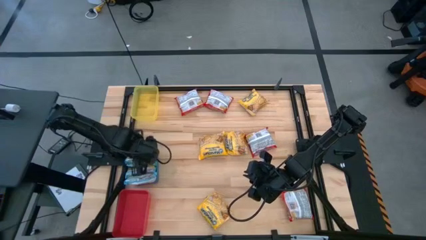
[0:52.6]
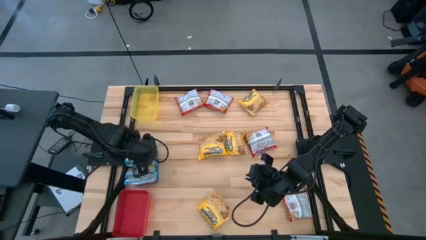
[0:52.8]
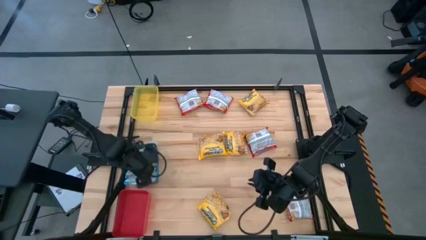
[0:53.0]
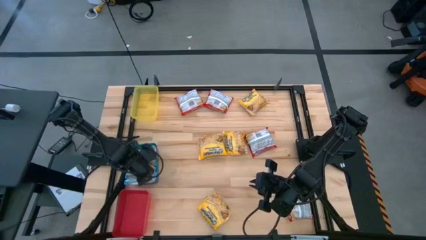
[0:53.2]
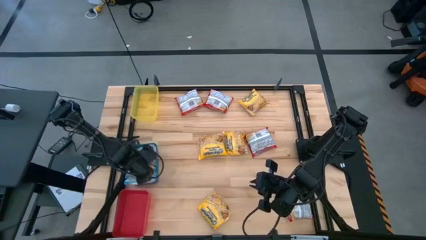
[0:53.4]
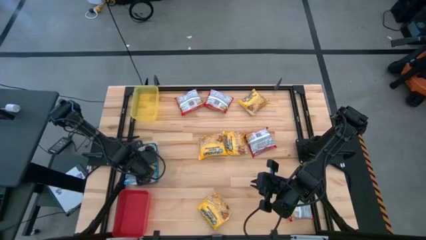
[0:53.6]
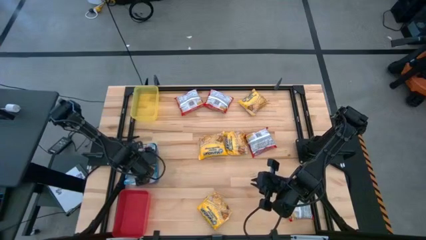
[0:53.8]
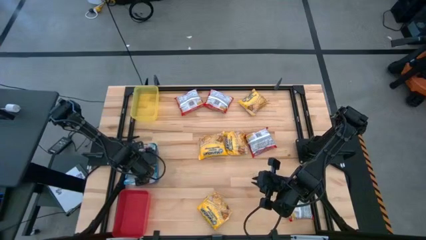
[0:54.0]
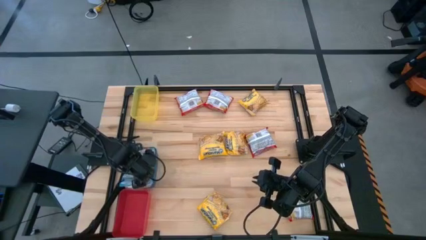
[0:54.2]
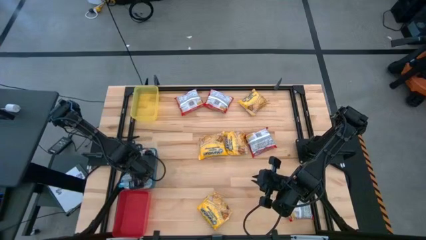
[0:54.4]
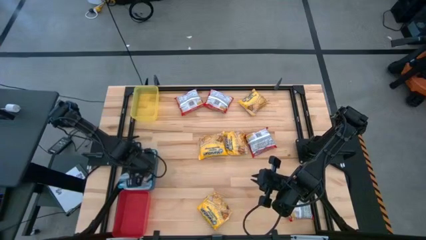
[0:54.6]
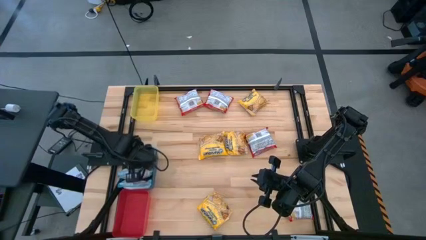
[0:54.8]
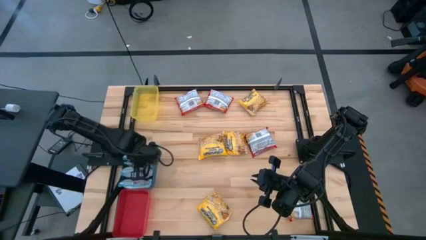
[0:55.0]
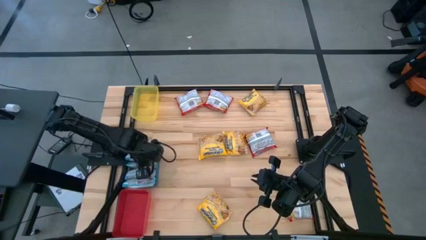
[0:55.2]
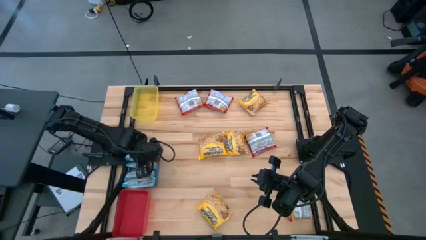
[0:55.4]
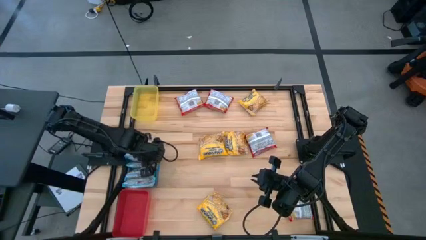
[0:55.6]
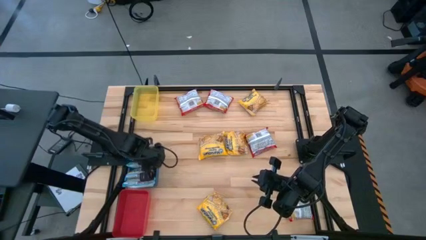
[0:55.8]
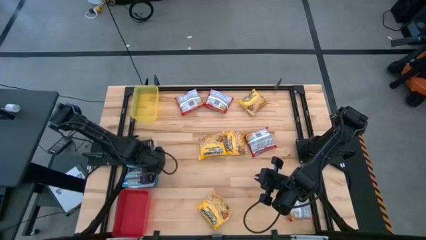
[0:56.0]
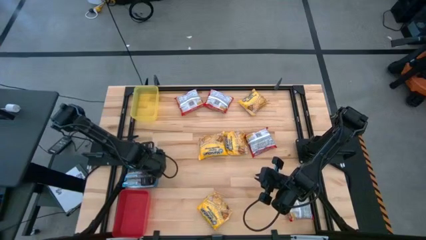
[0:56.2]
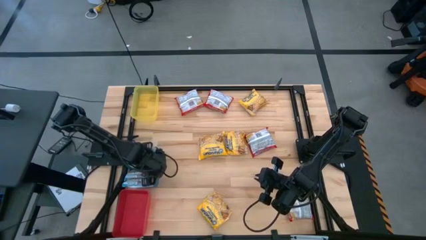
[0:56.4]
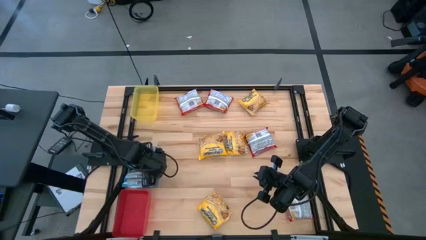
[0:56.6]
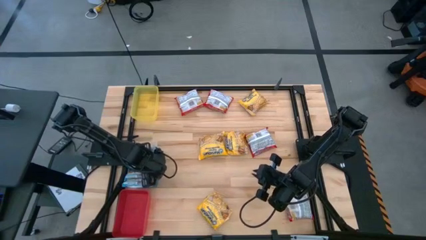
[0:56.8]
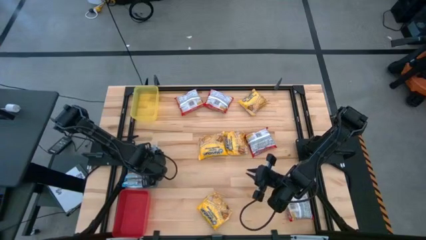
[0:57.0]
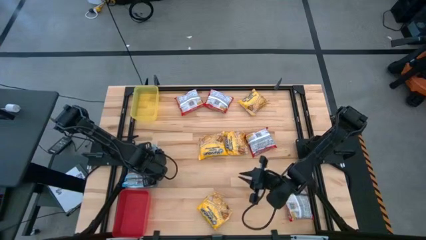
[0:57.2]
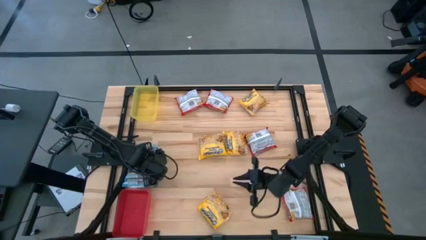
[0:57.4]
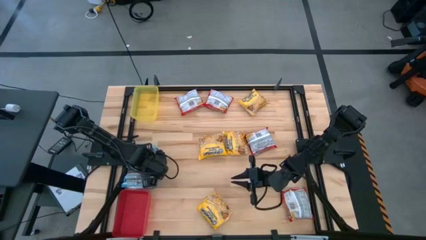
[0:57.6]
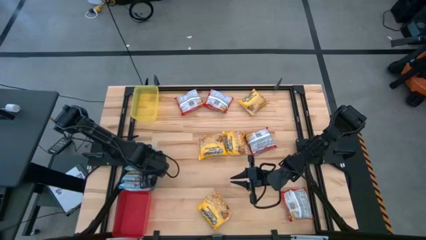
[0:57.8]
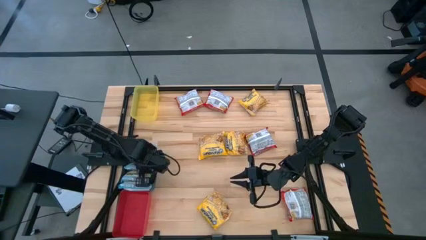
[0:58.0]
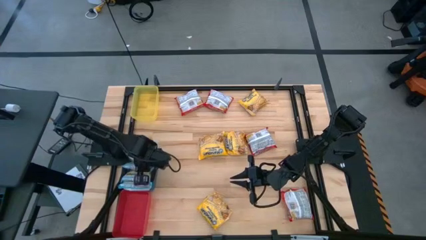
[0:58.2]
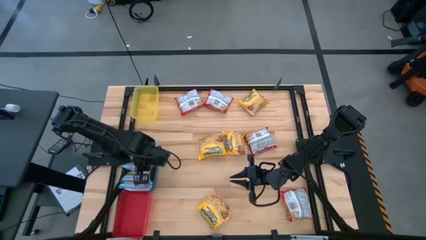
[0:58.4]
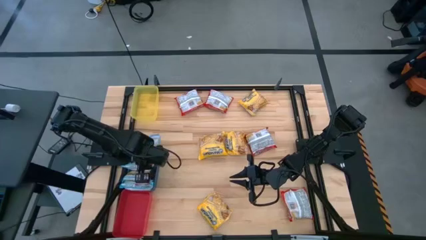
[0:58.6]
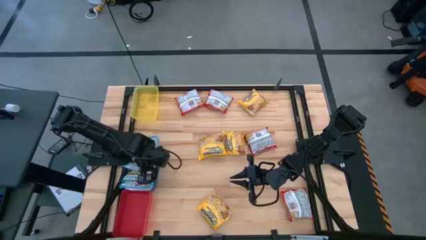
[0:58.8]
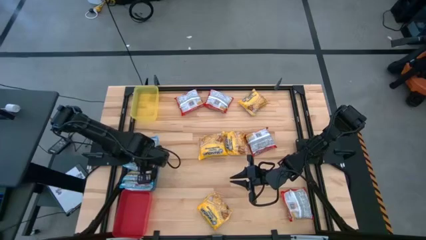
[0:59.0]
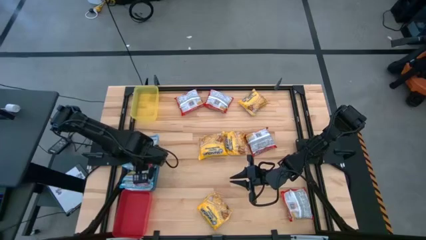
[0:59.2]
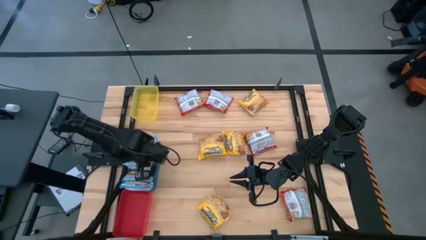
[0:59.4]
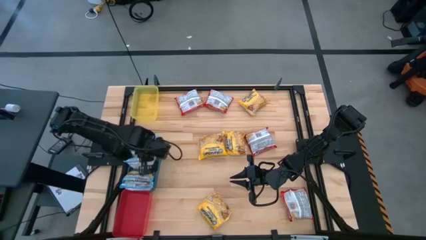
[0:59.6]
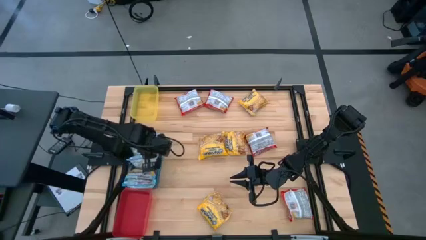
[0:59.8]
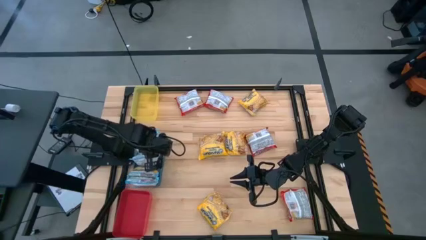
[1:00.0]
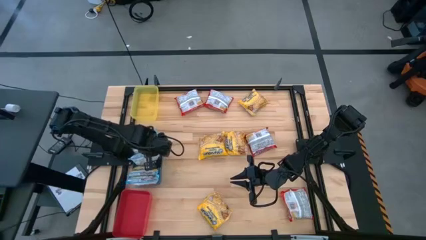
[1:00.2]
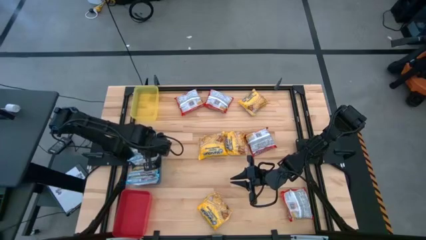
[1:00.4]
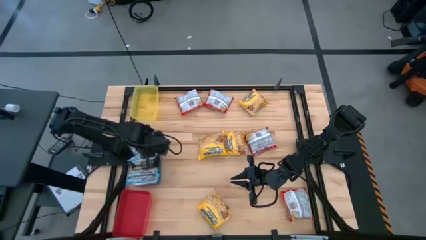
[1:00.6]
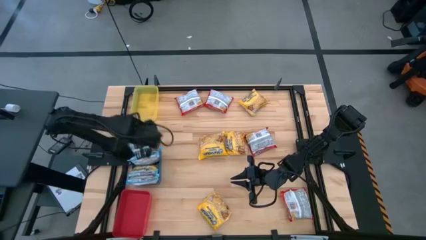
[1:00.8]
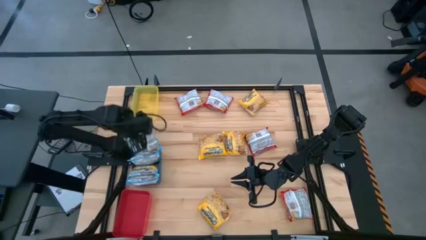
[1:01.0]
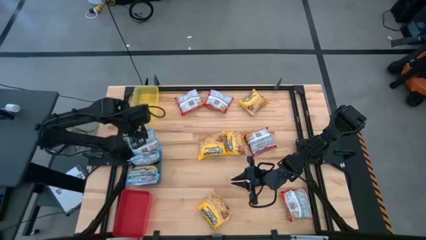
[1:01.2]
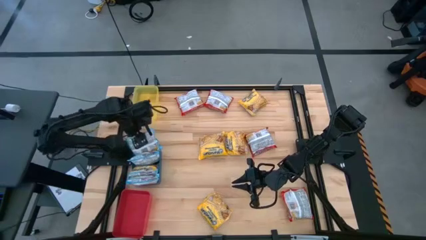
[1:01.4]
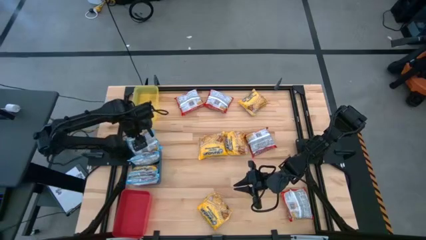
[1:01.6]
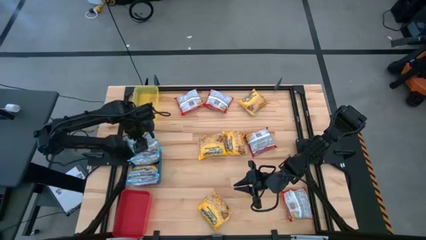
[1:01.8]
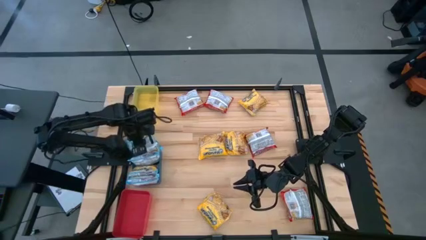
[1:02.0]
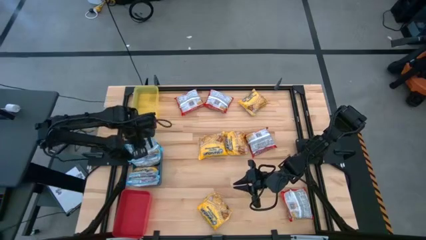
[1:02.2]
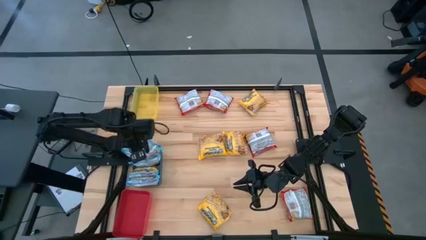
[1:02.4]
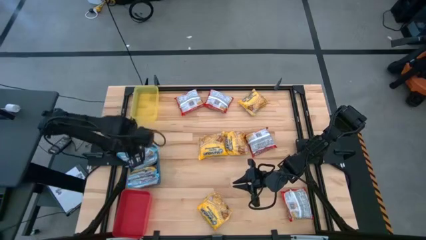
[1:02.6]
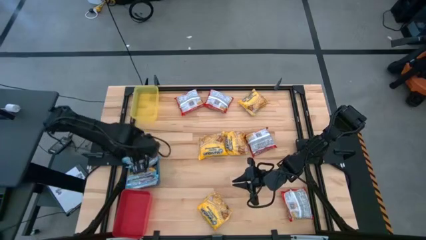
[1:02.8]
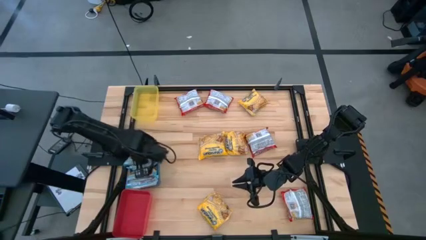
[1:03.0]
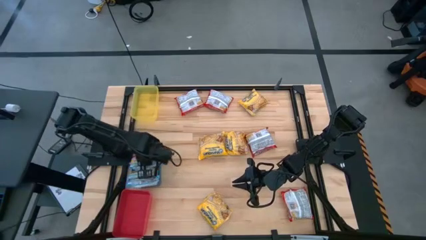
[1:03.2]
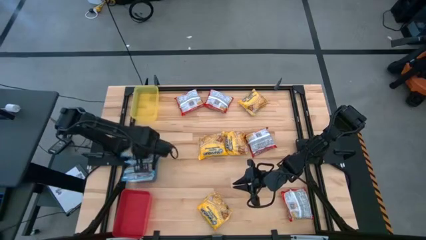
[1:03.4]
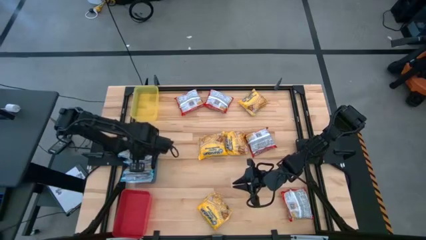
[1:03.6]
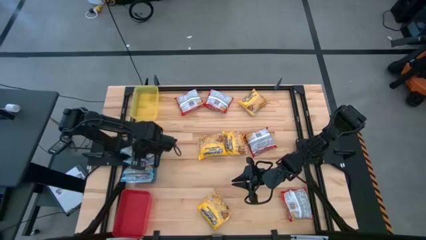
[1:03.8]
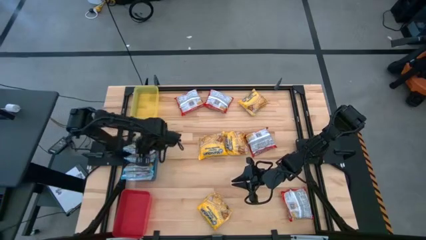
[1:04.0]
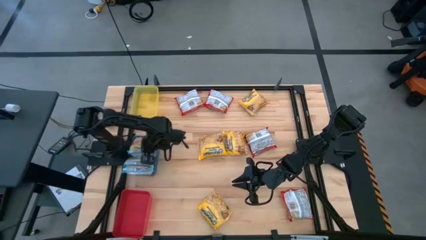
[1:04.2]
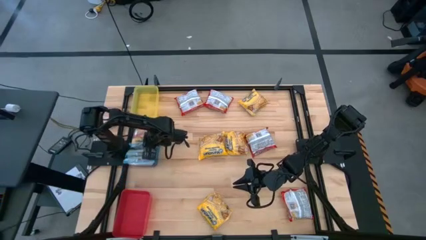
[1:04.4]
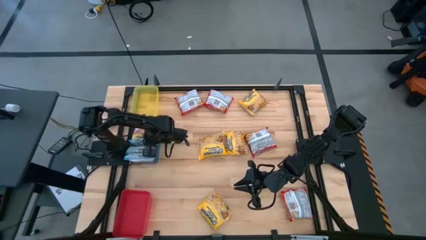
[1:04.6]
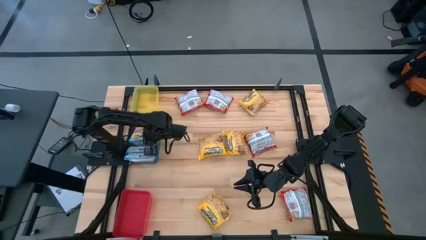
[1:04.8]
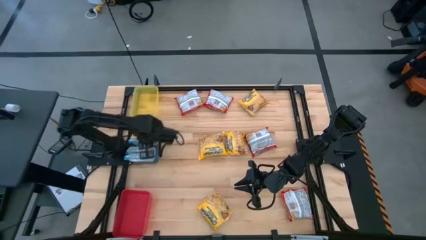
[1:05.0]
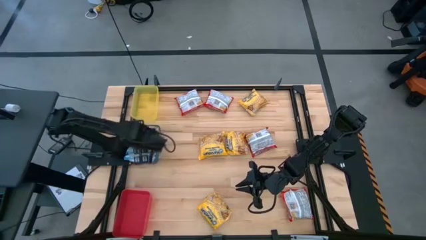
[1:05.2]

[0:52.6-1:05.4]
Task: Sort Maruchan noodles
Adjust the blue noodle packs in the blue bin

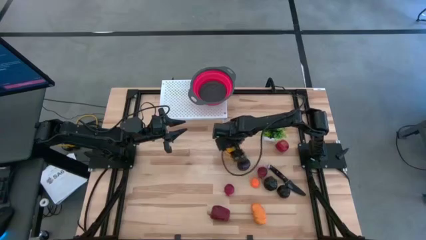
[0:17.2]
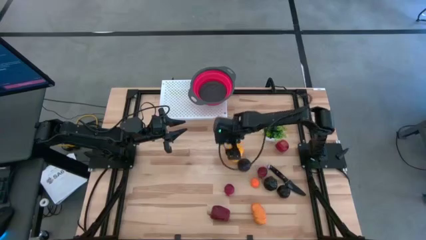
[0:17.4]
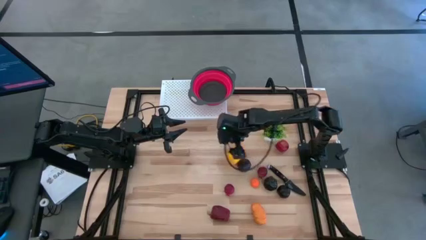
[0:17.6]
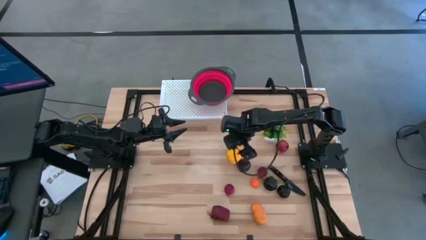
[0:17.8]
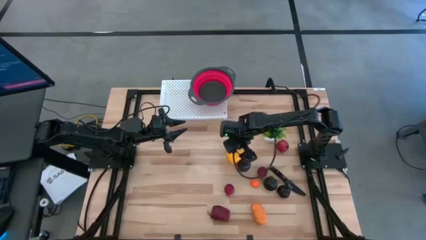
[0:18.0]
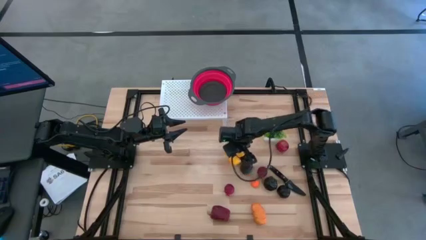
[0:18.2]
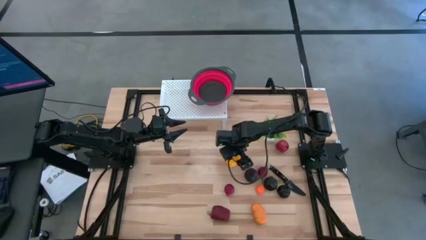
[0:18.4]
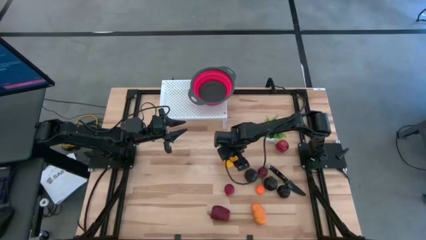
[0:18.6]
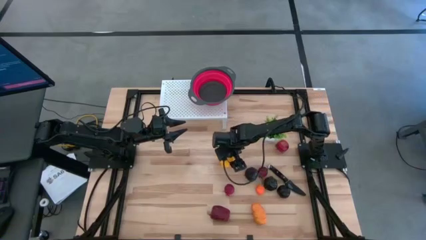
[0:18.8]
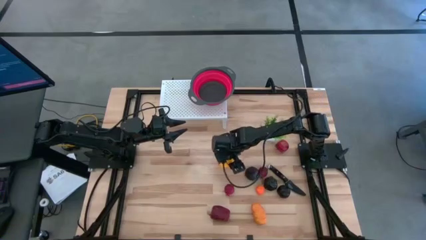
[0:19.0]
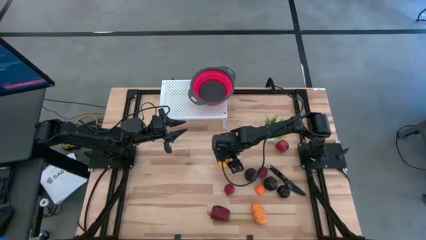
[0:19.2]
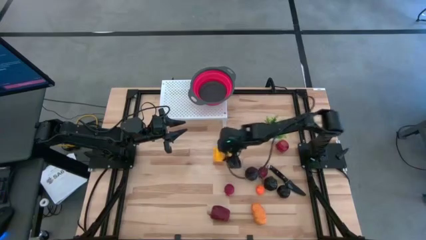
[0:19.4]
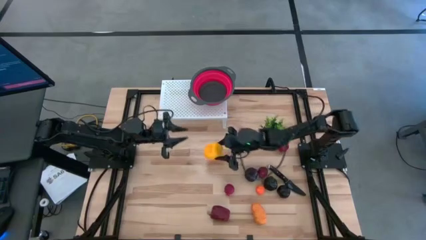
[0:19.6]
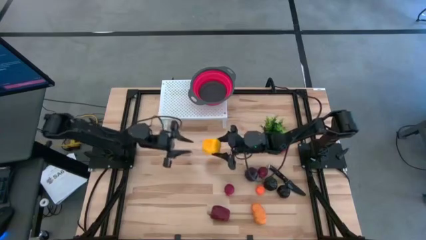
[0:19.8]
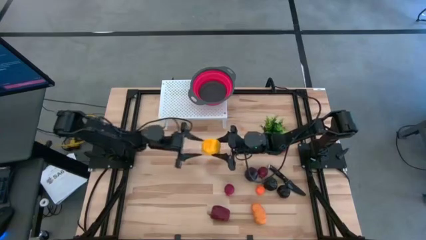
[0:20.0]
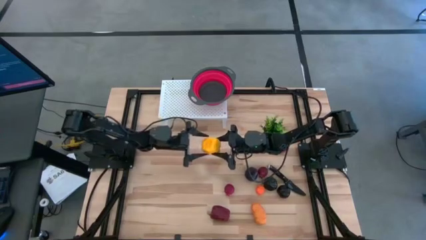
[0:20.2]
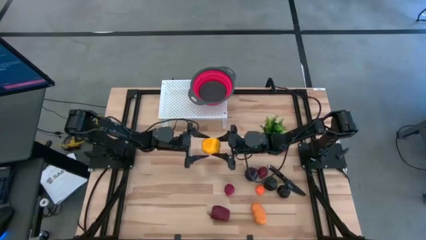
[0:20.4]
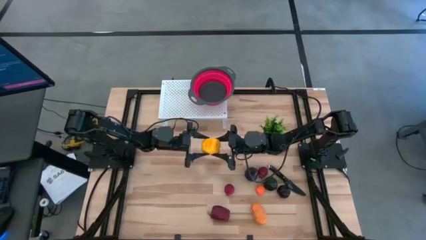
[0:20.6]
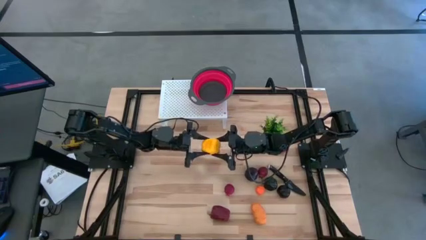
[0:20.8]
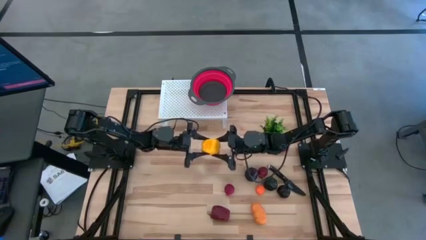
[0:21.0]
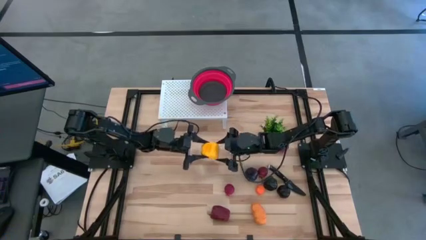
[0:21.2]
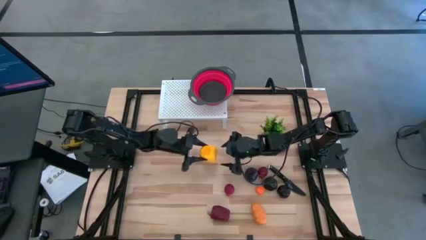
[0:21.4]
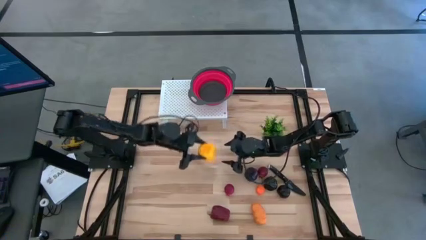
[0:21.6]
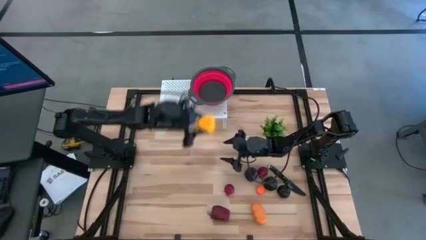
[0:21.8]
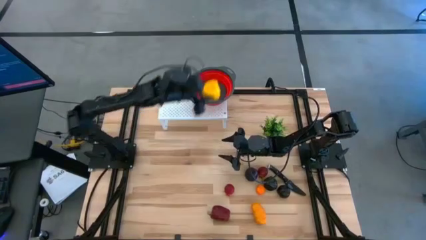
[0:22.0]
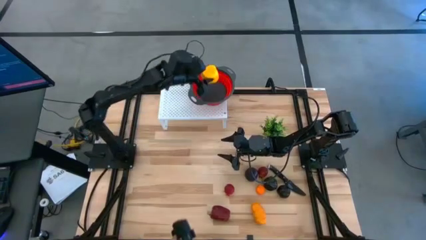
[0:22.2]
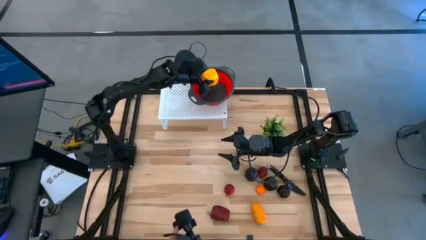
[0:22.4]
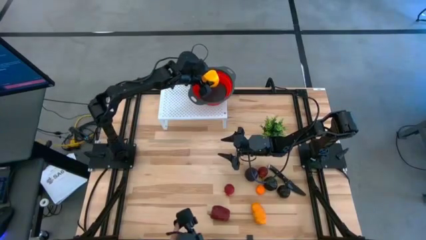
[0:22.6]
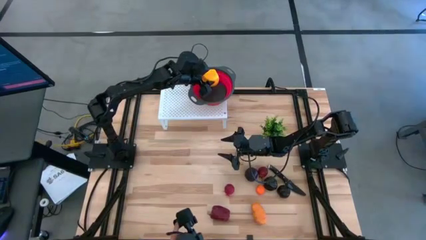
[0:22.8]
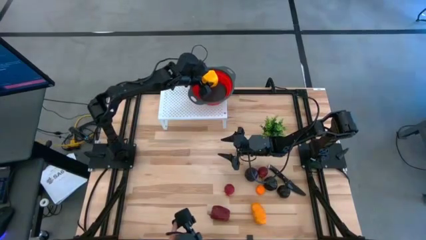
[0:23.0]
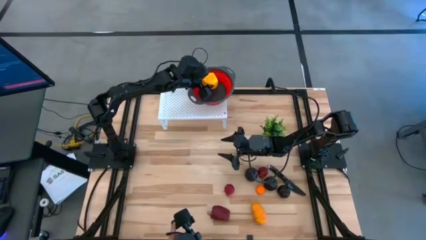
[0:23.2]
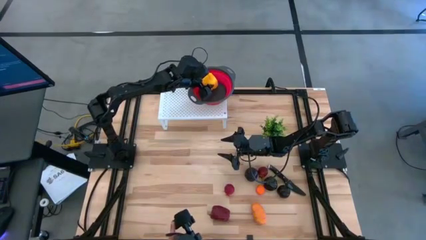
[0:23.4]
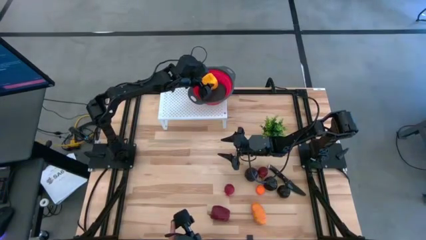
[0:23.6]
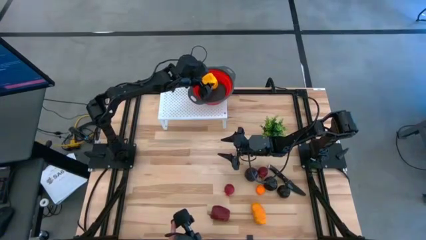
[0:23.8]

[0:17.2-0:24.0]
Task: Pick & Place Fruit
Put the yellow bell pepper into the strainer bowl on the shelf
